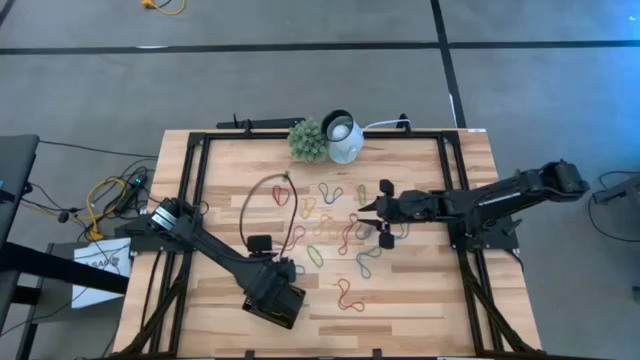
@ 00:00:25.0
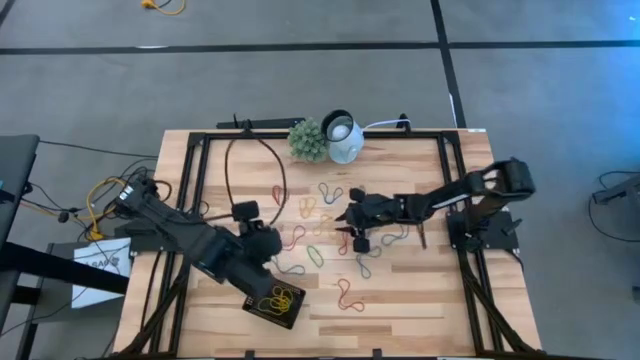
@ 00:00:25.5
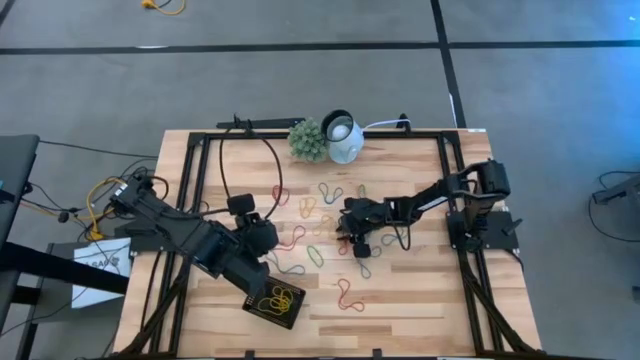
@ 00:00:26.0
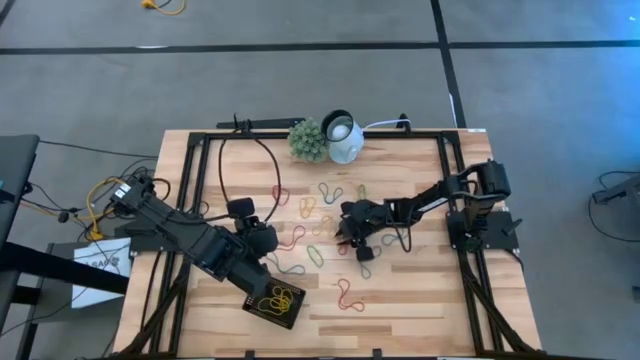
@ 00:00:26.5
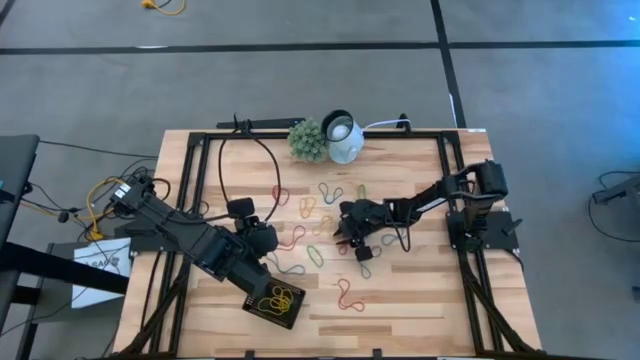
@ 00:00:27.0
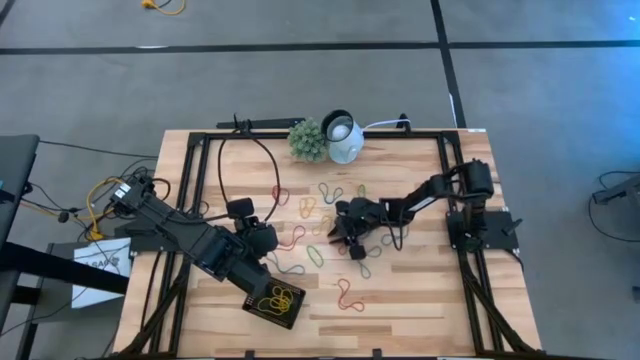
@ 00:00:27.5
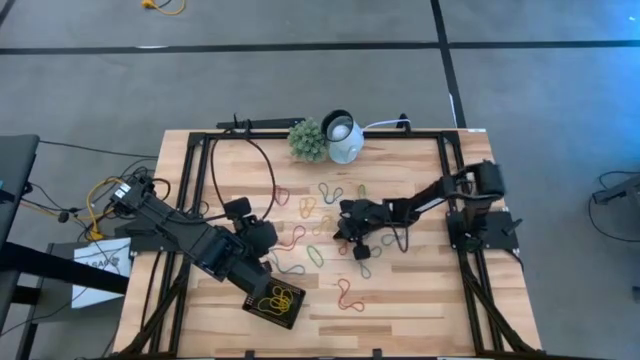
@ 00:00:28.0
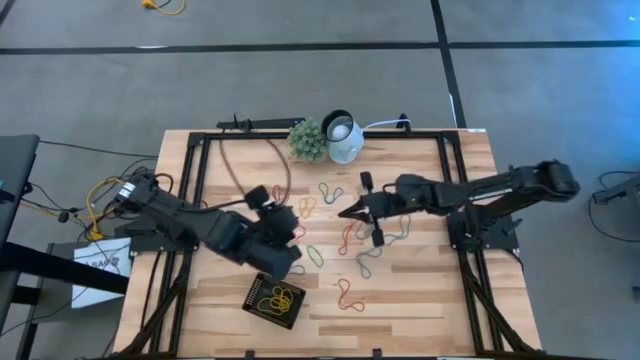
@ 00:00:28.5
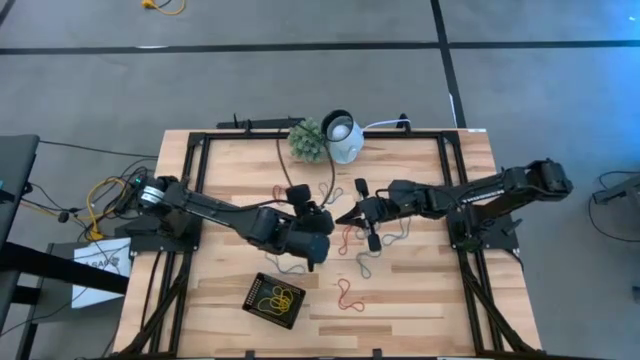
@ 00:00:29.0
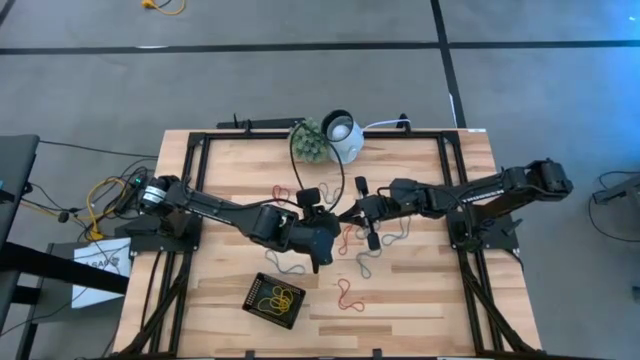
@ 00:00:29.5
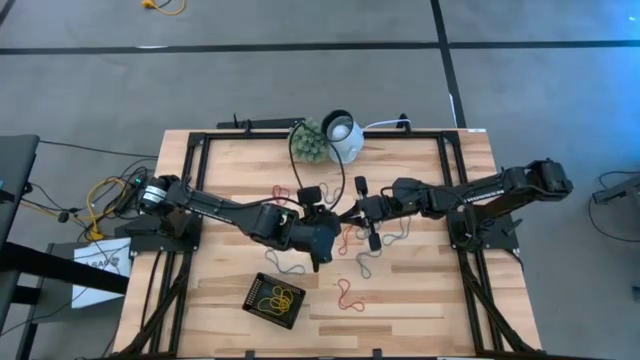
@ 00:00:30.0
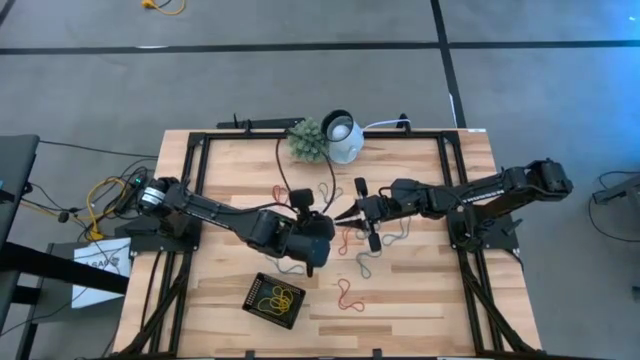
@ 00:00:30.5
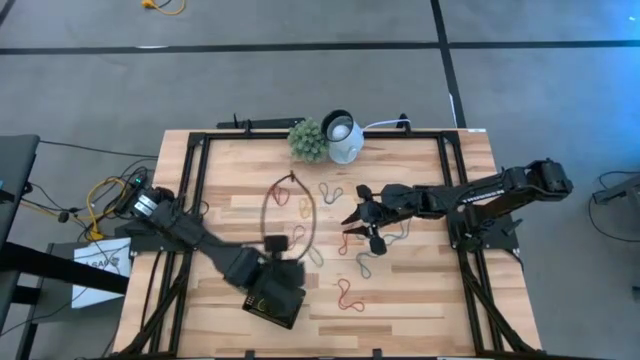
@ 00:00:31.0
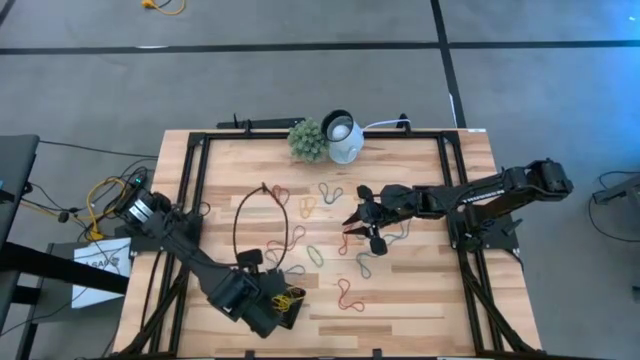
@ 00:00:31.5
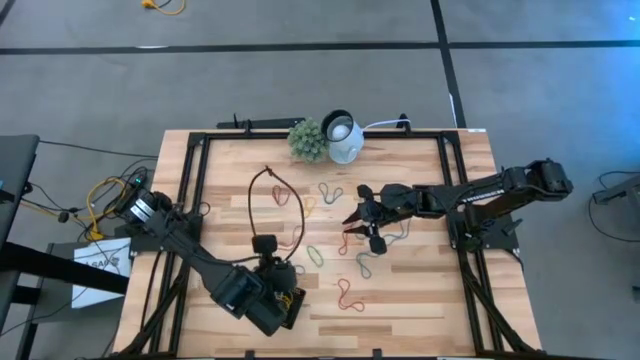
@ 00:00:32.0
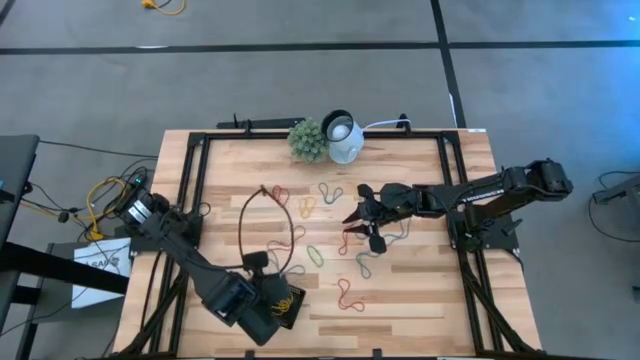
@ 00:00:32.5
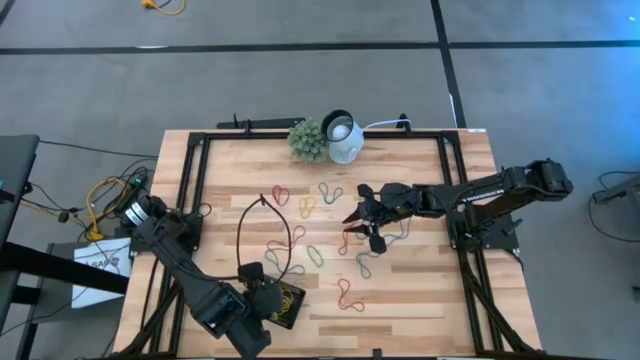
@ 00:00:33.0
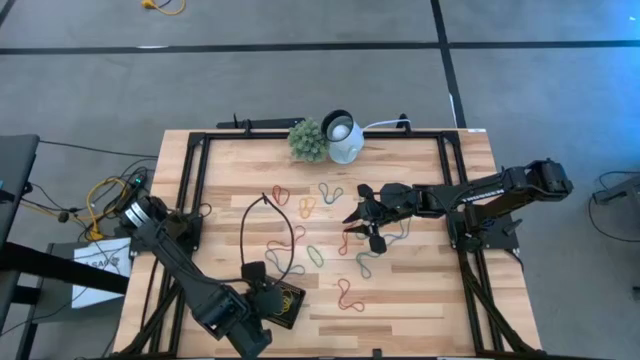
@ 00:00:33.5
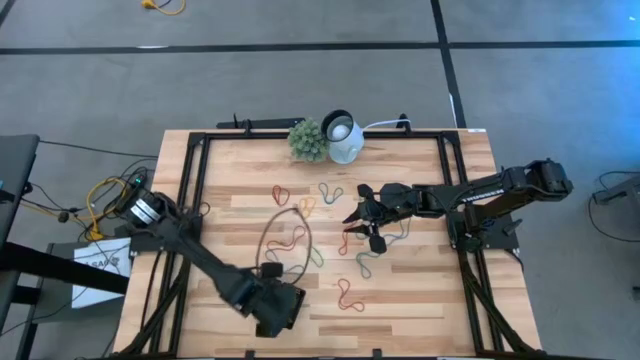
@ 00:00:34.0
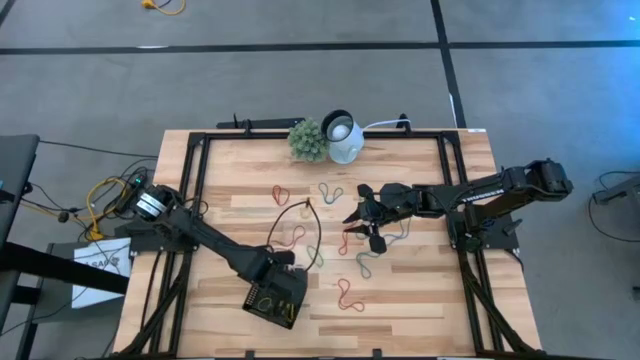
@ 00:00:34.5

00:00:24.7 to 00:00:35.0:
Task: Pick and place items into bin
Put the yellow rubber band into the black bin

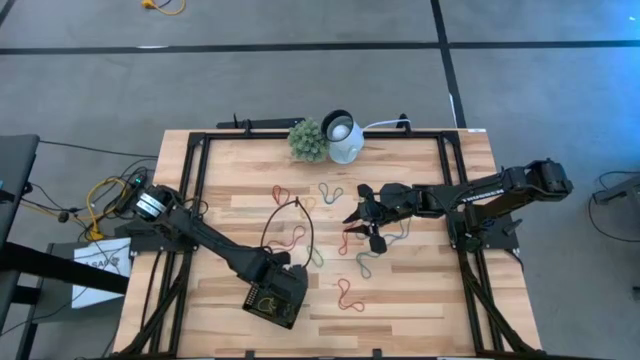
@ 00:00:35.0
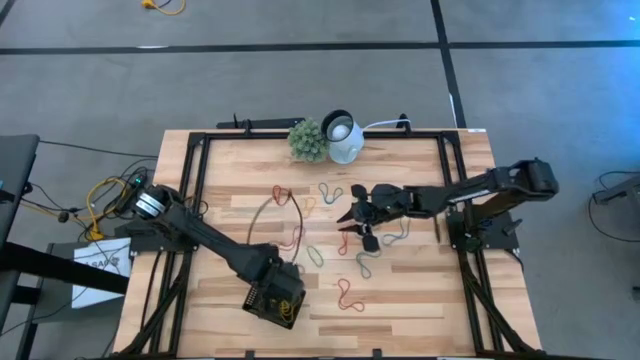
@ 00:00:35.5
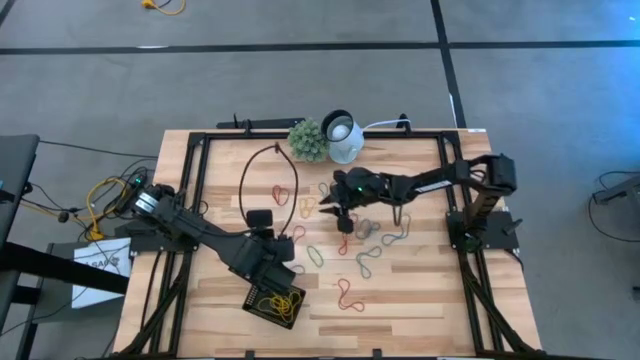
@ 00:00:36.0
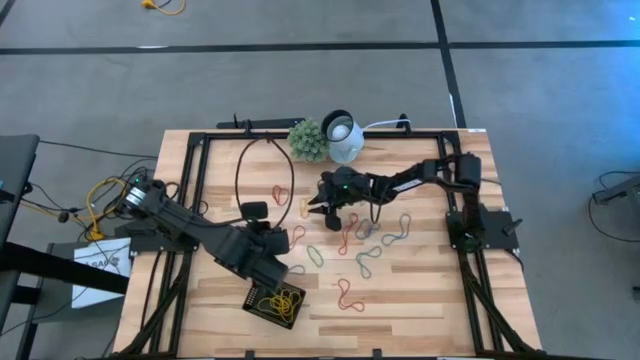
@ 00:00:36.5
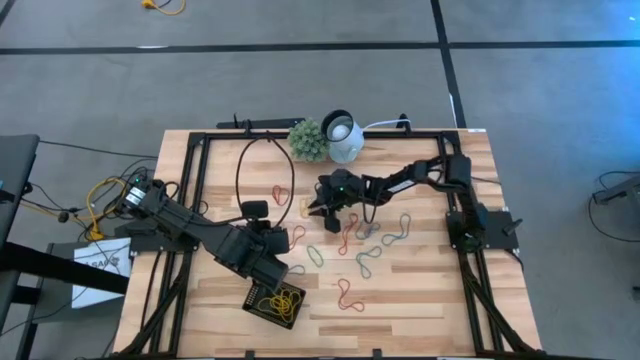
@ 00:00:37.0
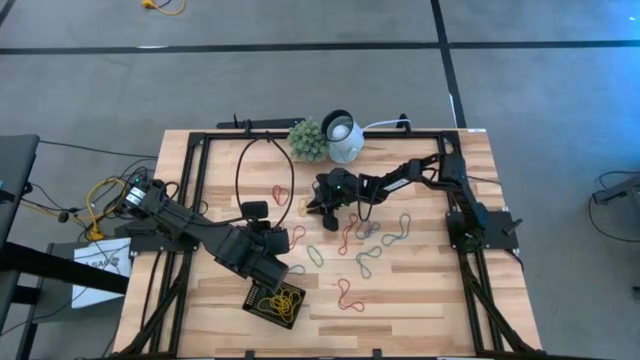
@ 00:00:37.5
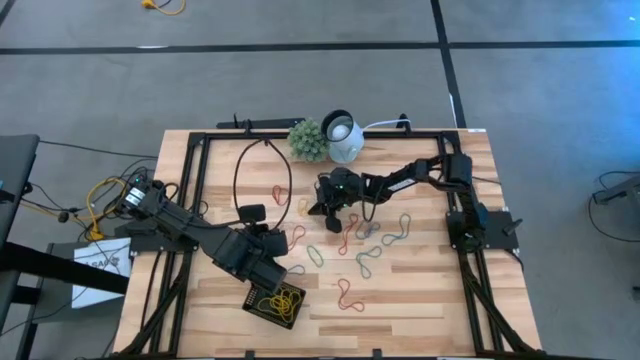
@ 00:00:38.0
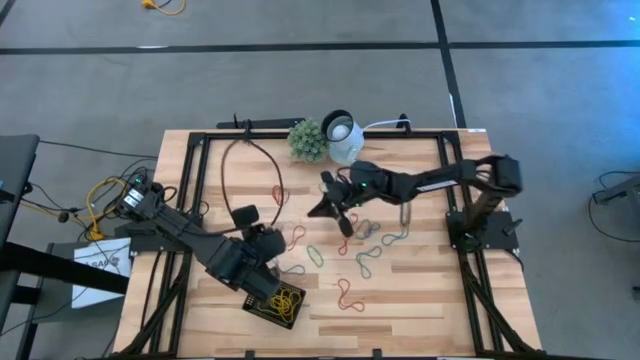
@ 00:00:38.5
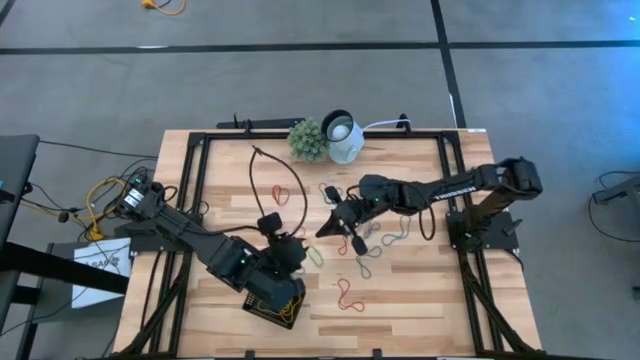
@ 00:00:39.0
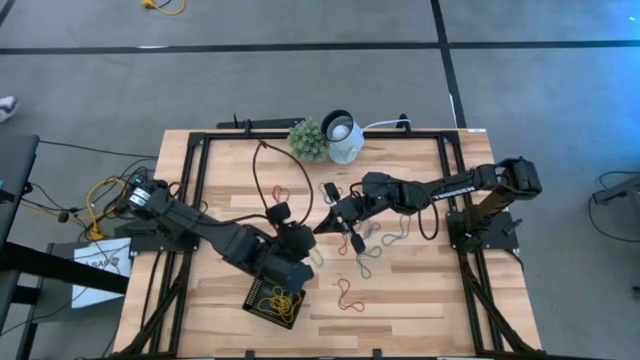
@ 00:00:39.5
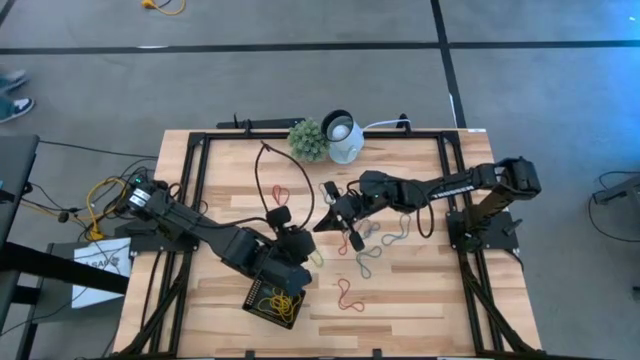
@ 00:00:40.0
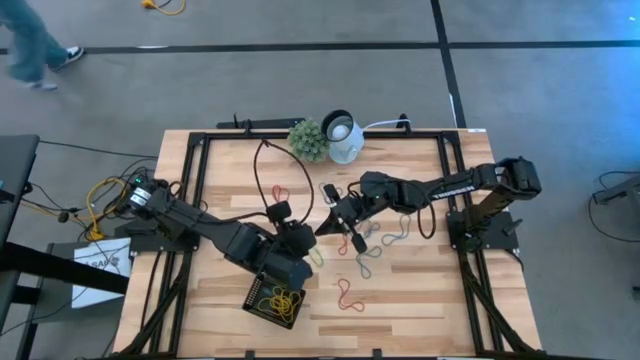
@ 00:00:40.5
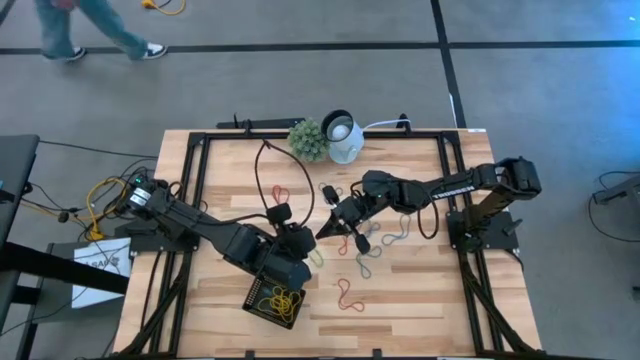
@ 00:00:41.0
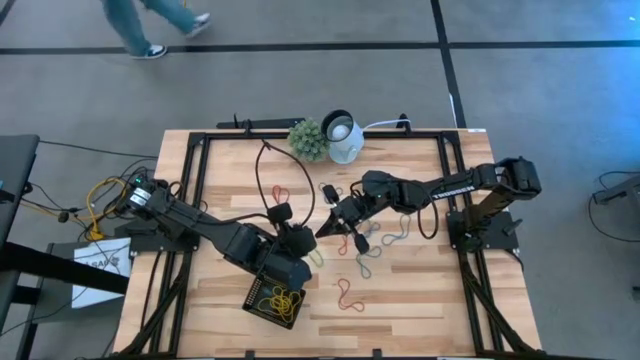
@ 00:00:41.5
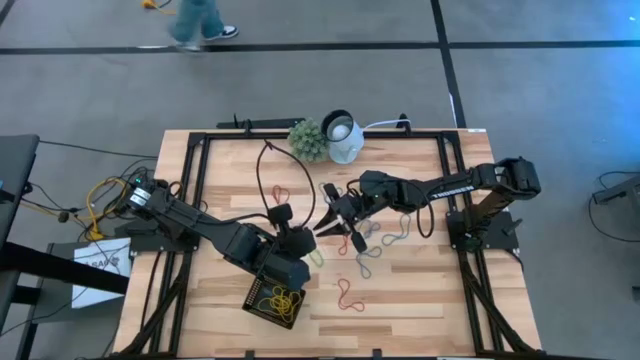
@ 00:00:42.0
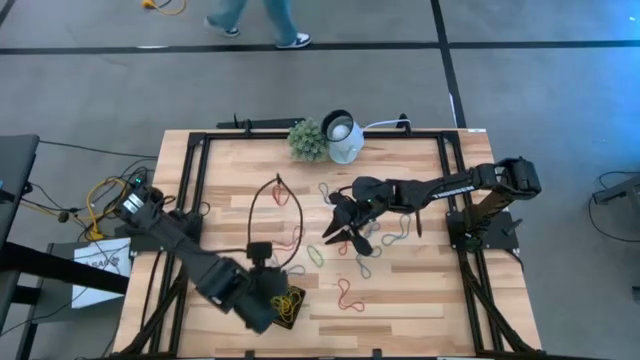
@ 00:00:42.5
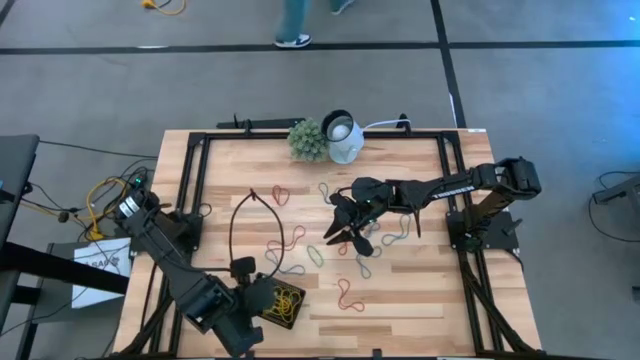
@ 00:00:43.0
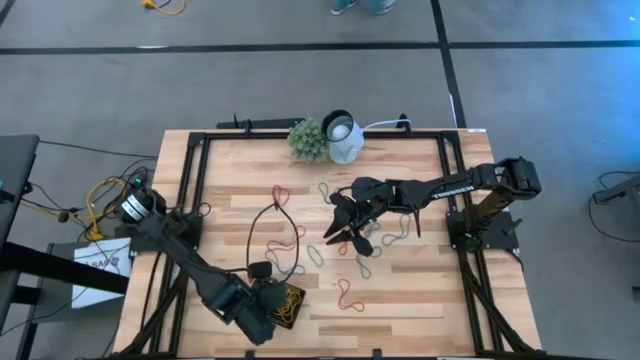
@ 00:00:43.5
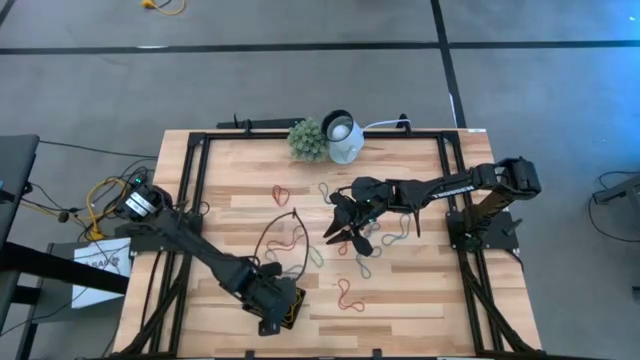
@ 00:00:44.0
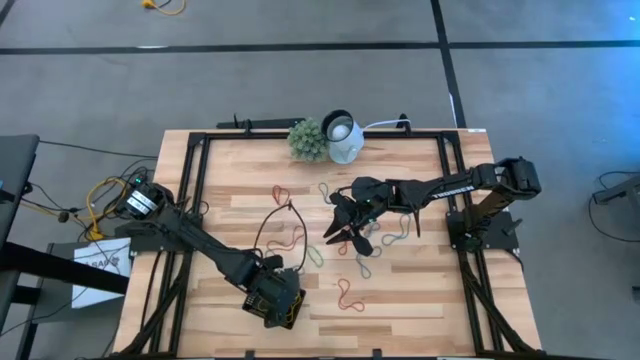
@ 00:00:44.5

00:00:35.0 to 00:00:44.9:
Put the yellow rubber band into the black bin

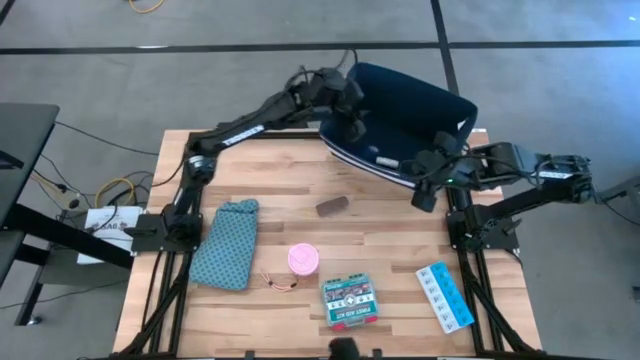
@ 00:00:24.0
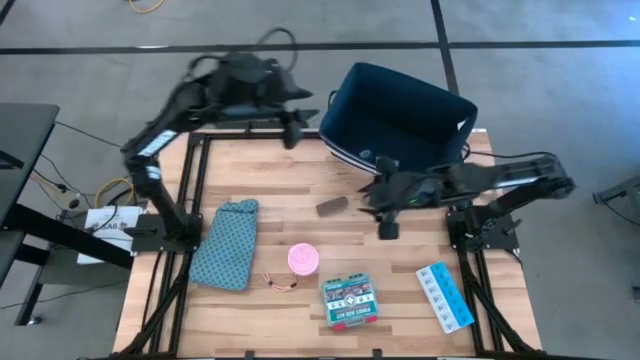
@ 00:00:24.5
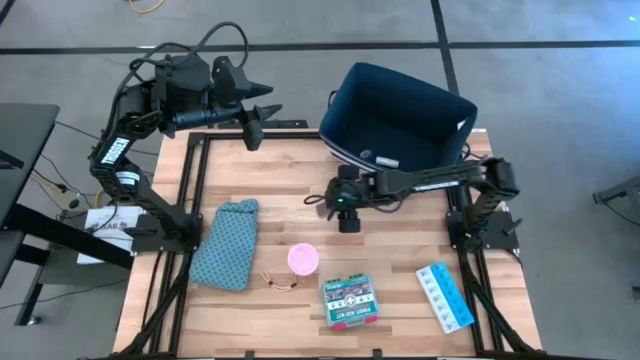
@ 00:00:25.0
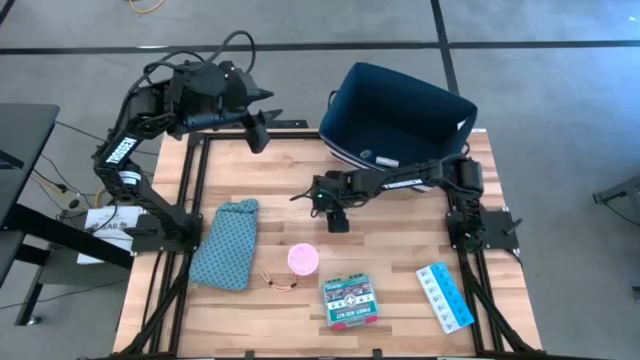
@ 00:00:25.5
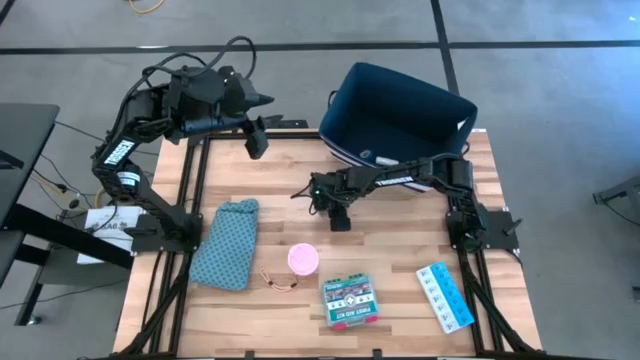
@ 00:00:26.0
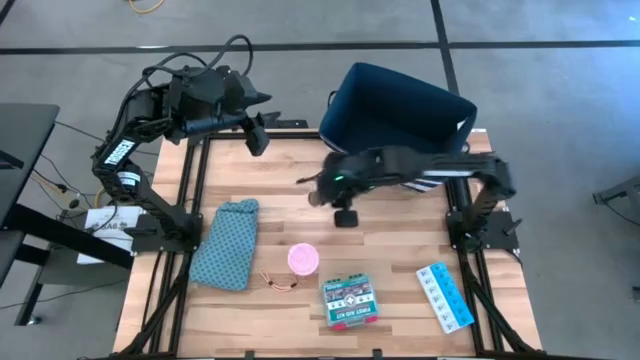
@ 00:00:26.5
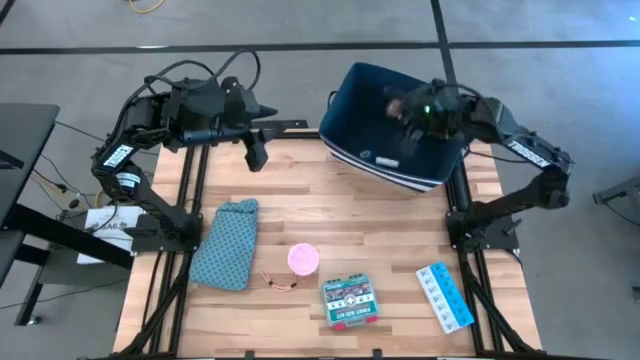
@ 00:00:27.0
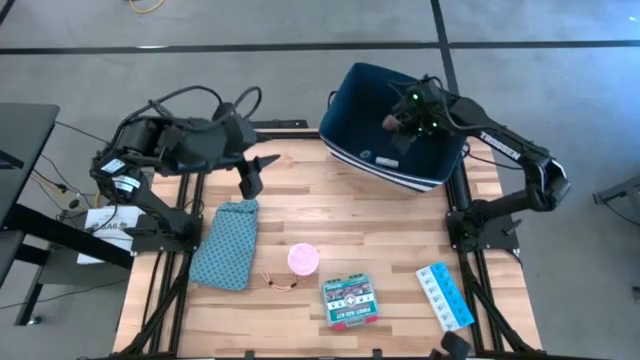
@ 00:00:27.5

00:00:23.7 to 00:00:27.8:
Task: Pick & place medical supplies in basket/bin
Put the brown bandage into the blue organizer bin
